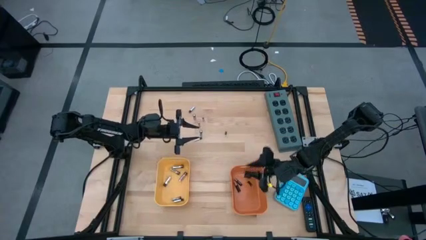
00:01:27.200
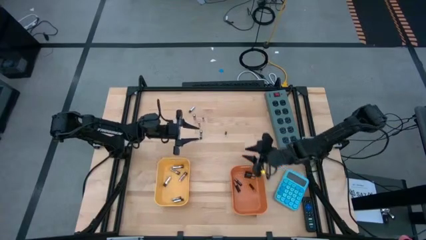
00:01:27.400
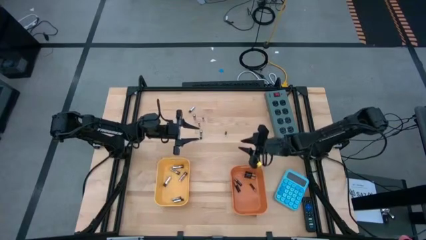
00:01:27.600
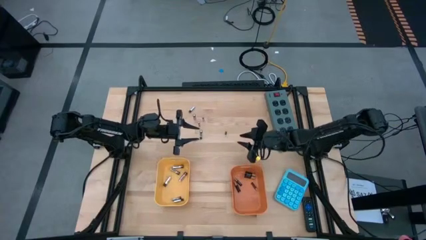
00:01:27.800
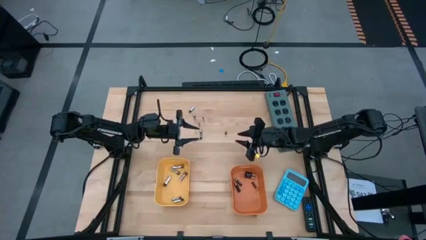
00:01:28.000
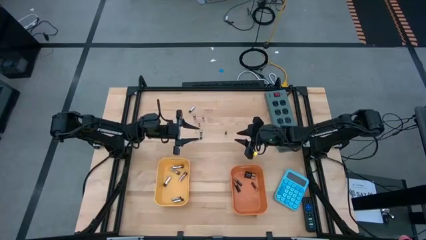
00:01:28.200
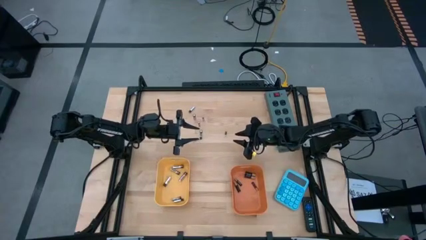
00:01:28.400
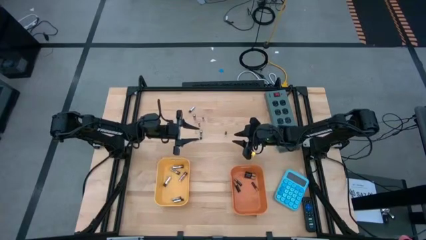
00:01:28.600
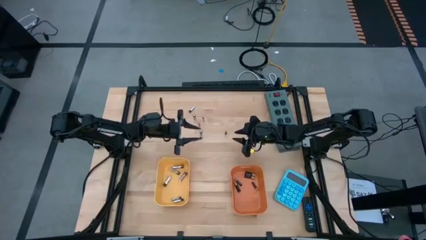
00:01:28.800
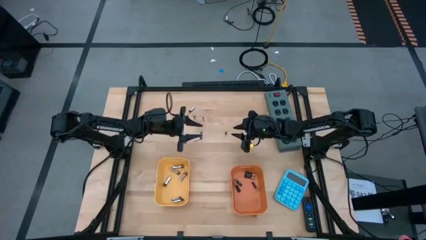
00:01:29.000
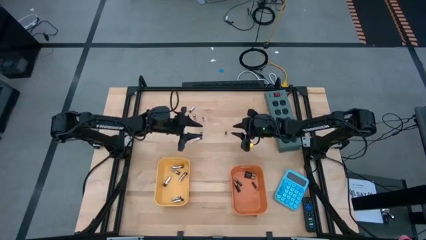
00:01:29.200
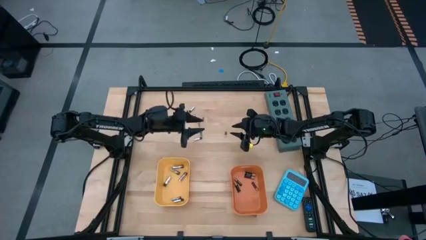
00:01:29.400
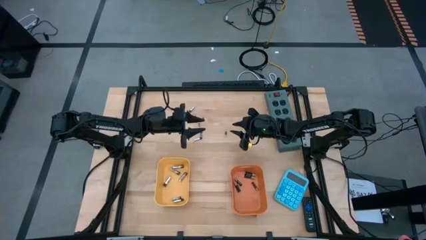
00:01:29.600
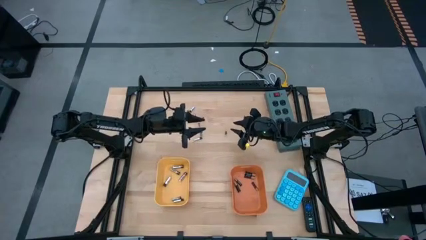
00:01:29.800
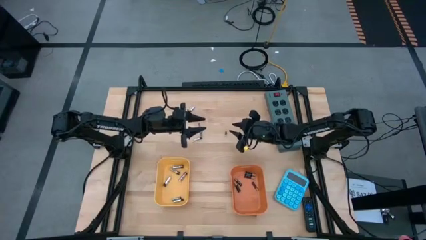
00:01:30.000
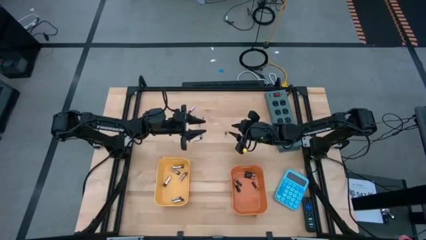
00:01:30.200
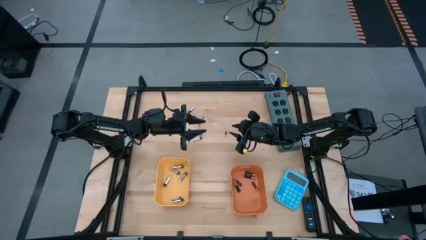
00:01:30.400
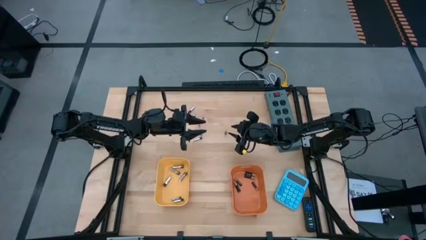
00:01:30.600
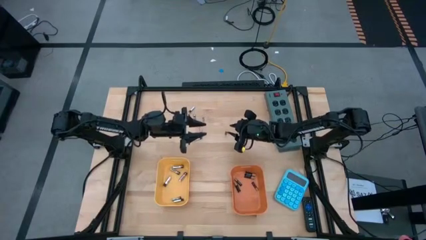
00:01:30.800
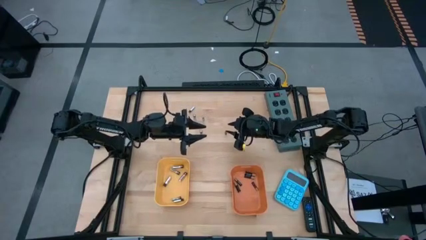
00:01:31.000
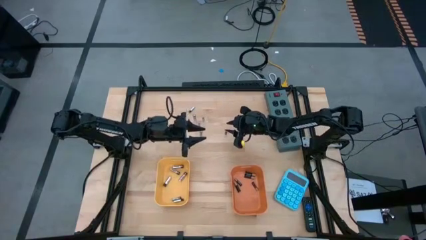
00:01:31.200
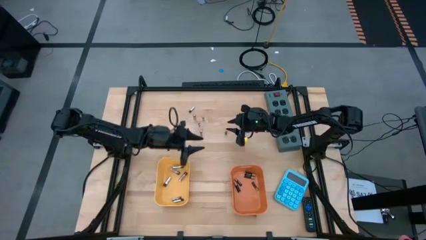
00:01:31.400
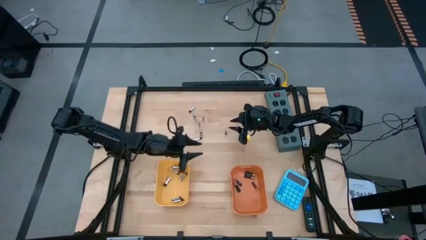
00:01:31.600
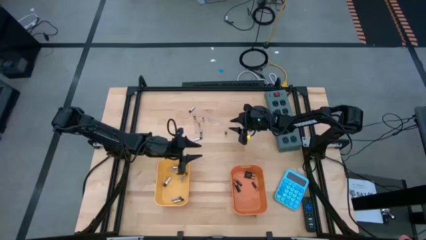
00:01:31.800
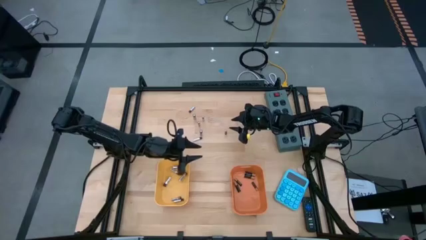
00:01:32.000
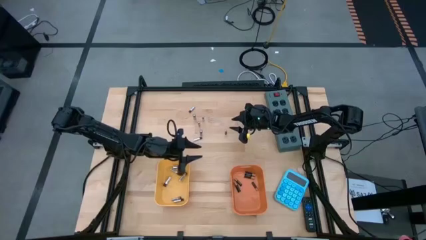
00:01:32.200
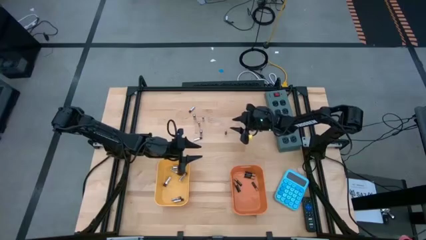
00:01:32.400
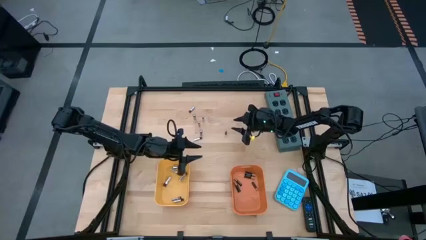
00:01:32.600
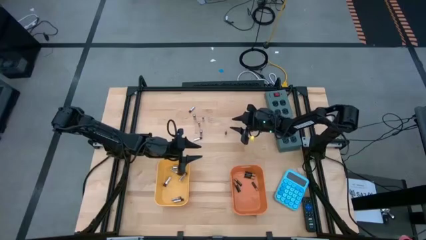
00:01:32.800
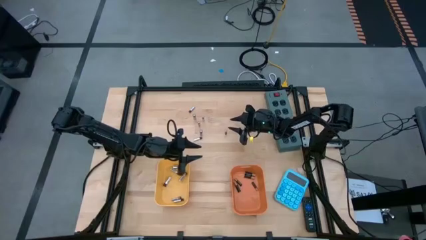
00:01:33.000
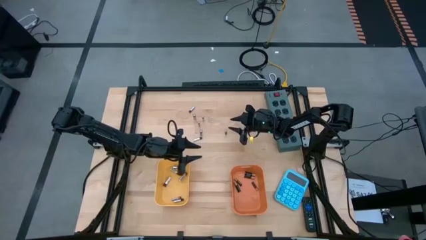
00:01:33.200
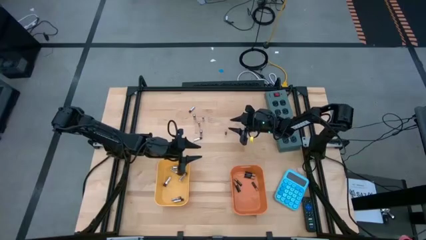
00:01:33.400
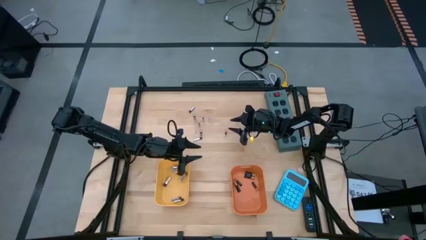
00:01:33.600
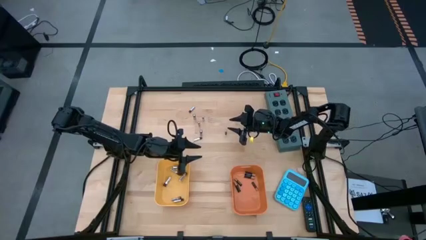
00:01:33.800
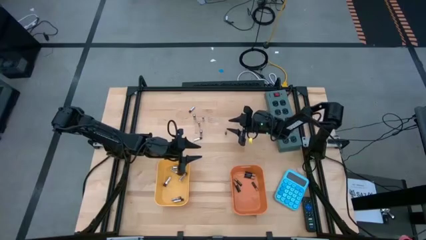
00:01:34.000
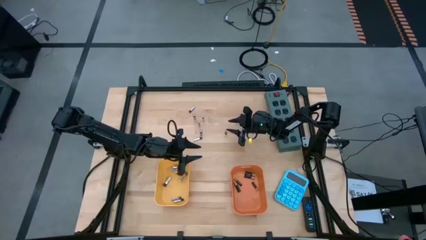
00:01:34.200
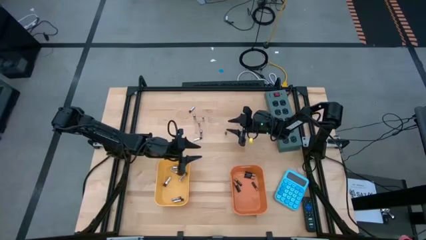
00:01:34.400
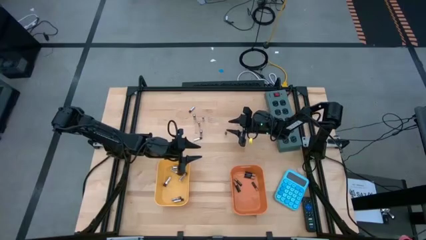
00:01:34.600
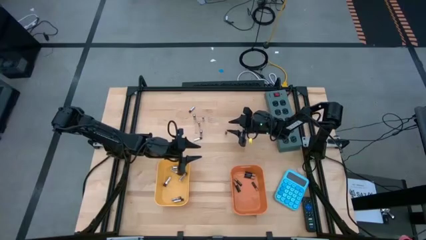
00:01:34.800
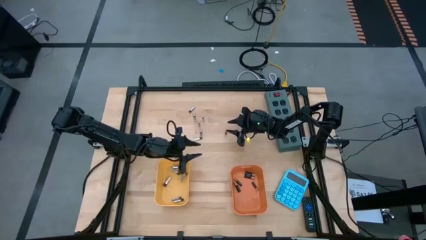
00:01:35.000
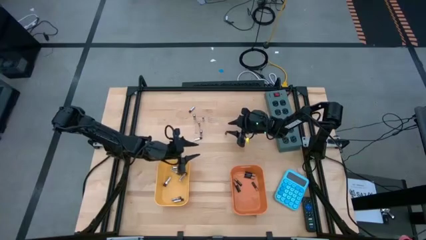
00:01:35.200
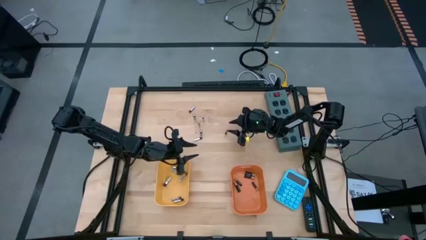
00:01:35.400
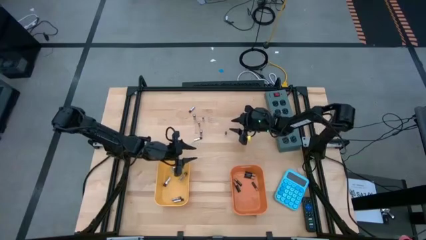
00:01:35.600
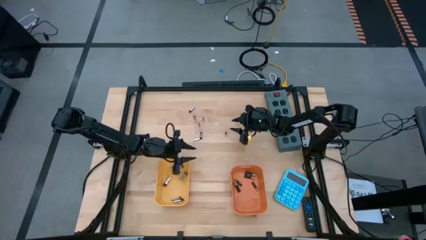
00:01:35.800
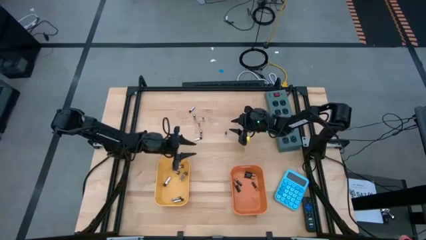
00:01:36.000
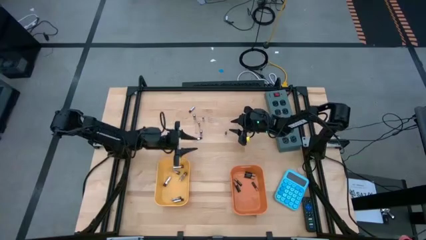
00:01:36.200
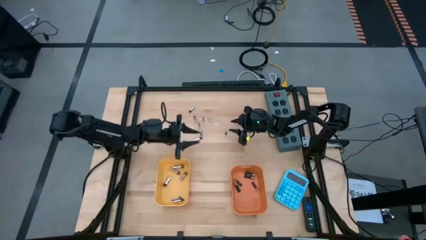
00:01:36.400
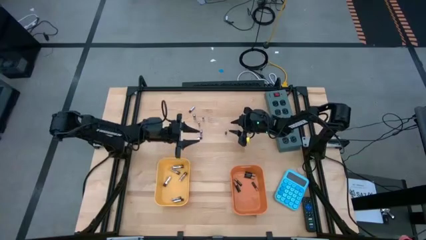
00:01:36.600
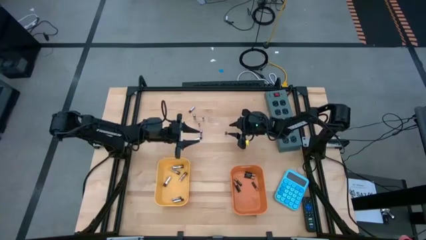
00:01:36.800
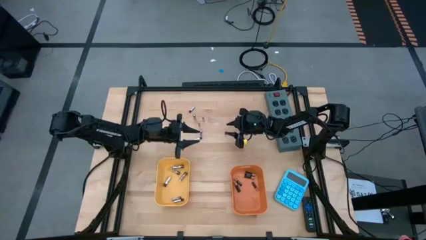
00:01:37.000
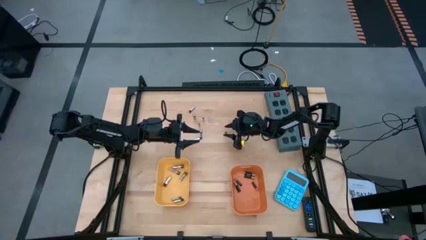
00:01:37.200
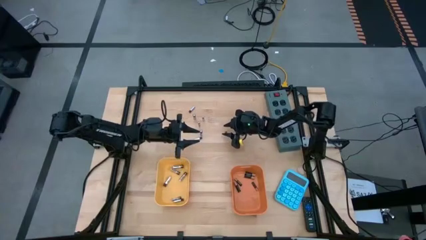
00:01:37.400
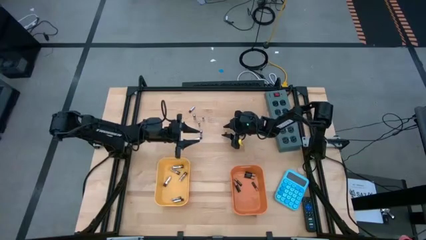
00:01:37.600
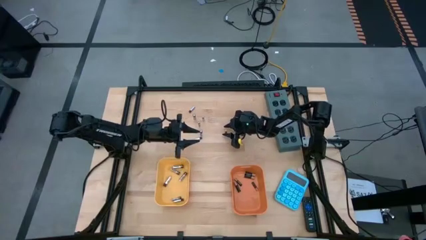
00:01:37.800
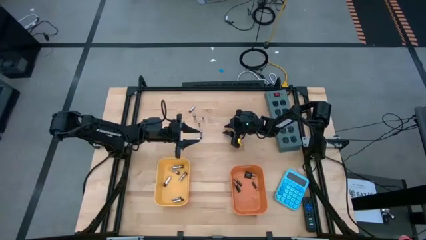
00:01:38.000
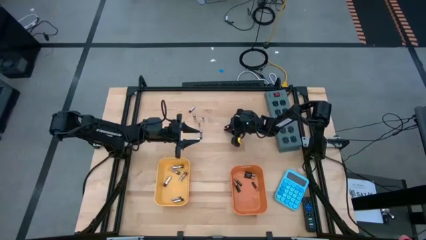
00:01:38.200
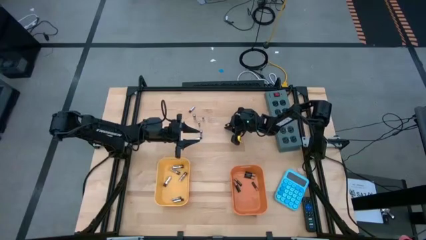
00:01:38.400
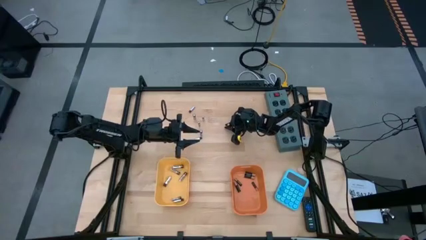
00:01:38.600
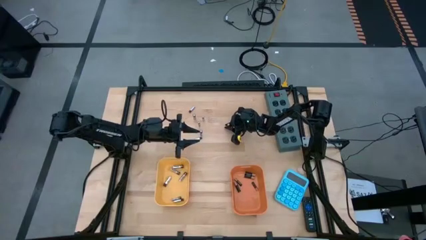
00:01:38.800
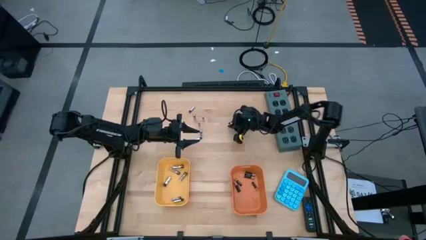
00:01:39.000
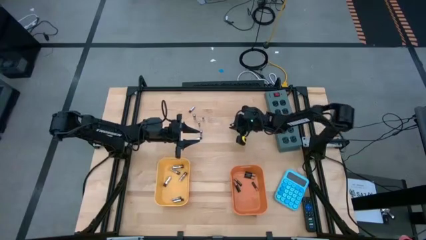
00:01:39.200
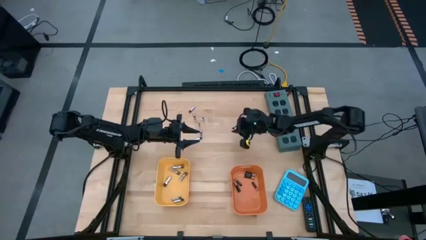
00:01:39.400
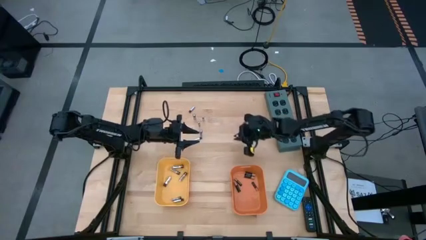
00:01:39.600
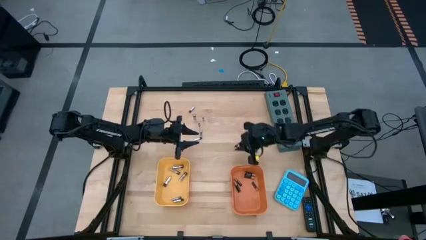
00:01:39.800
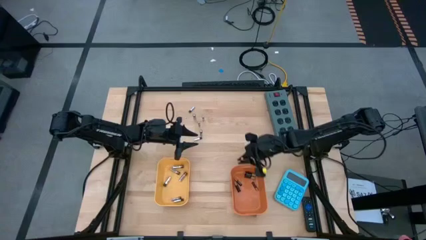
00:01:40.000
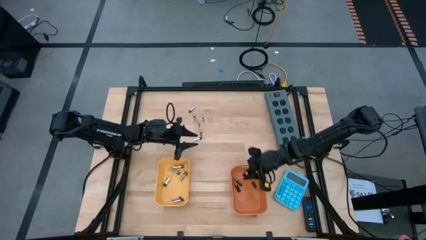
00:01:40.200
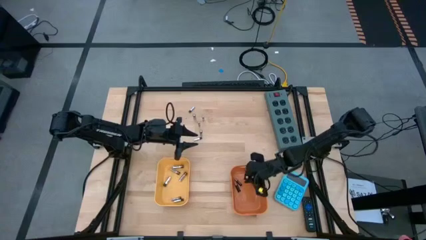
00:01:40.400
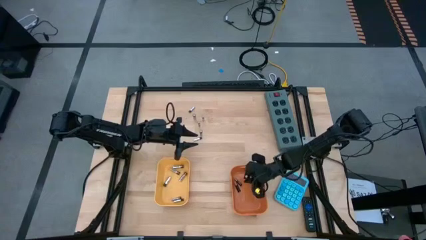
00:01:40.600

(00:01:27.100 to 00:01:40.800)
Task: Sort batteries
Put the black battery into the orange bin

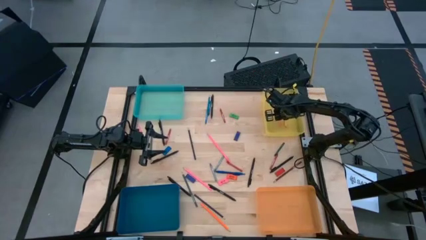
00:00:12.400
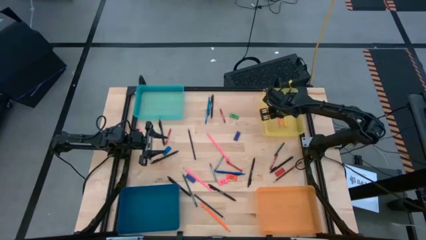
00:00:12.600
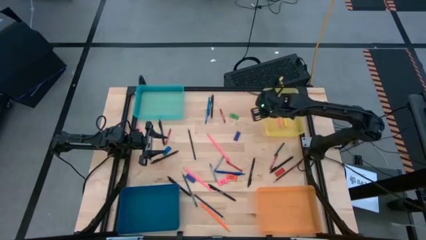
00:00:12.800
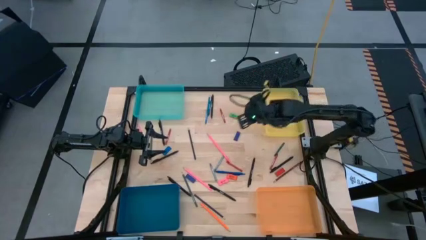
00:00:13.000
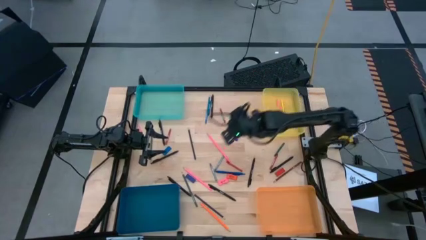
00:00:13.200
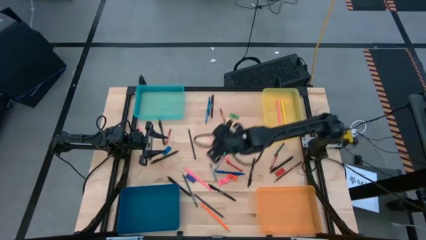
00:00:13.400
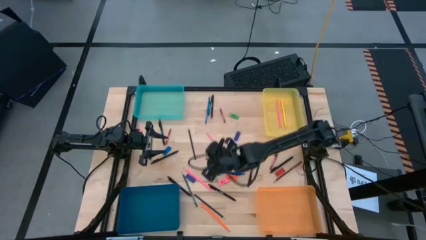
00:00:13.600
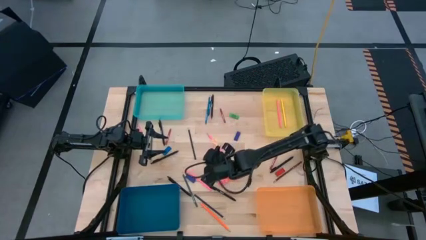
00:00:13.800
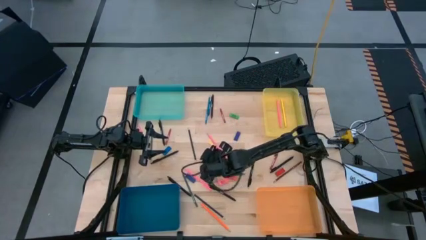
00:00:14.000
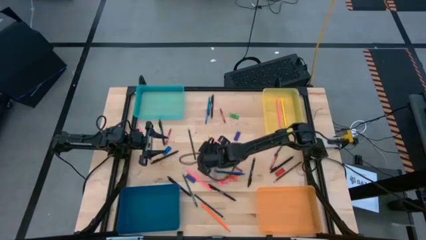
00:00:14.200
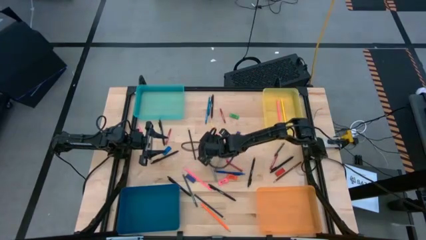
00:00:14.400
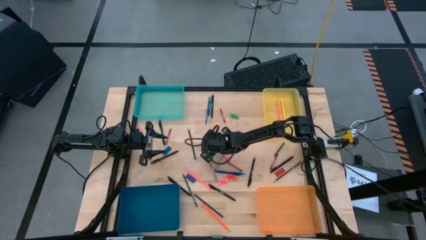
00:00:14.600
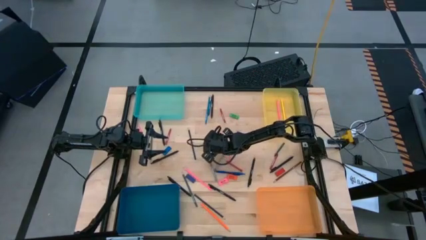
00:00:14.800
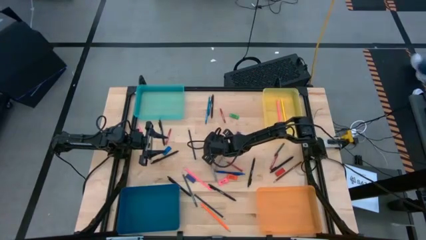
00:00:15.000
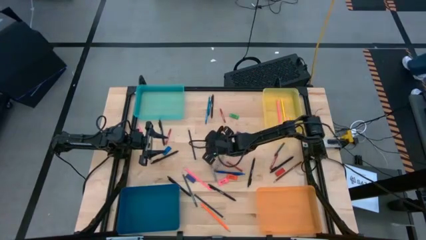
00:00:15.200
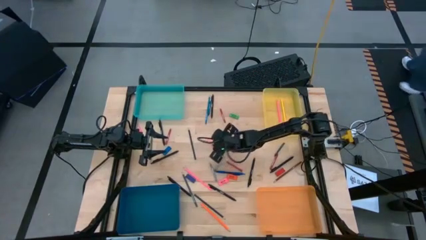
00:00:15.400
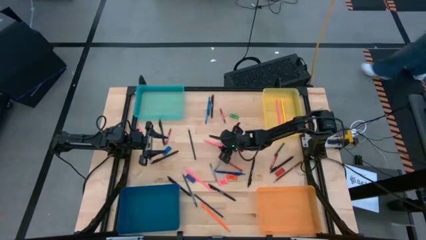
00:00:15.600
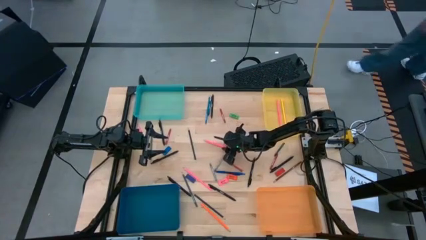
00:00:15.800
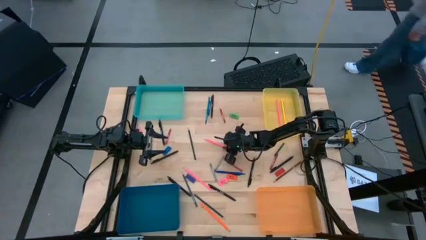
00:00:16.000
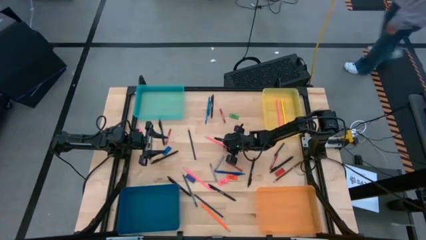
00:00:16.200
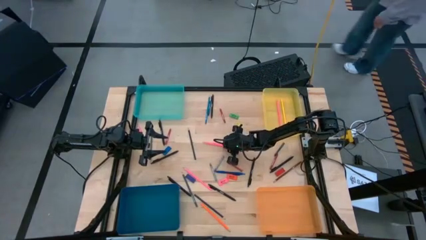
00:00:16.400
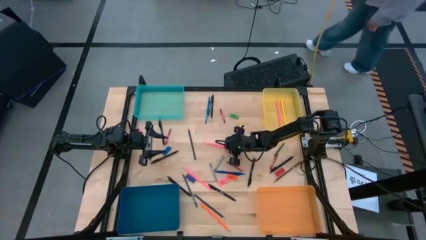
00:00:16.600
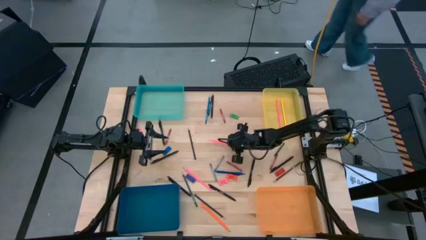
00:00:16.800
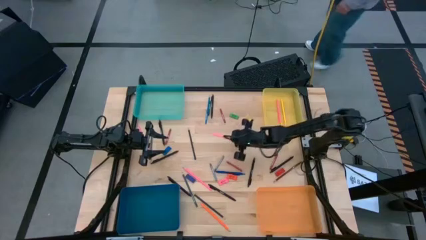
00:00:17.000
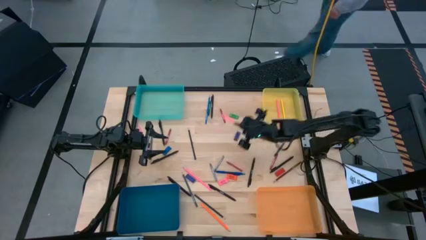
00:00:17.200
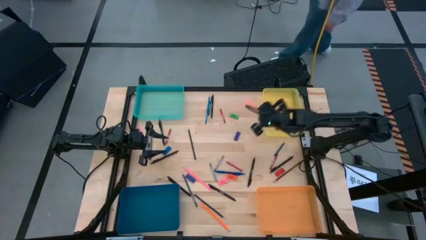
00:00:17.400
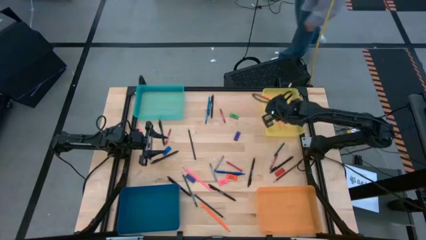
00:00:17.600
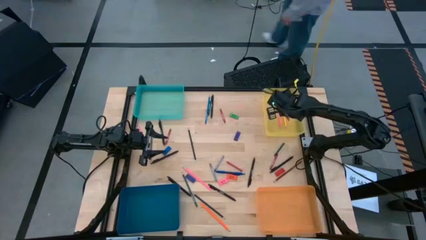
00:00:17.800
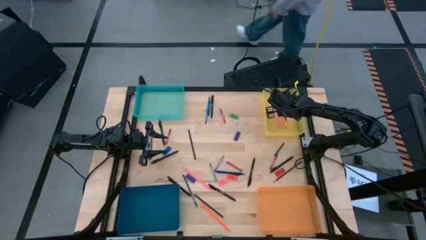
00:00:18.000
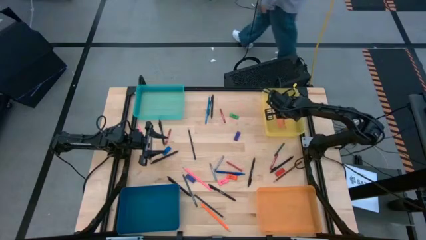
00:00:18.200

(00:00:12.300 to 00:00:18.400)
Task: Sort crayons/erasers/pens/pencils in bins
Put the pink pencil into the yellow bin
